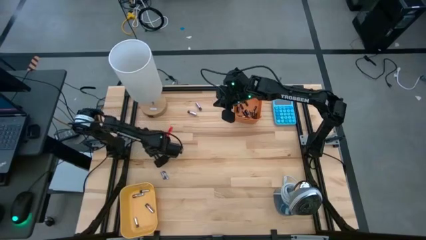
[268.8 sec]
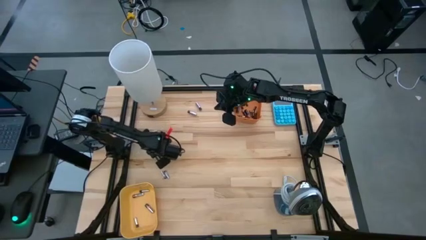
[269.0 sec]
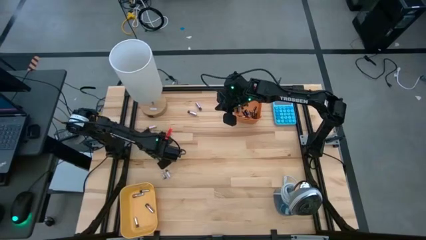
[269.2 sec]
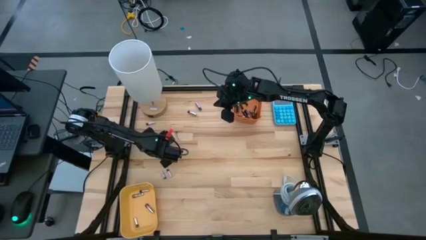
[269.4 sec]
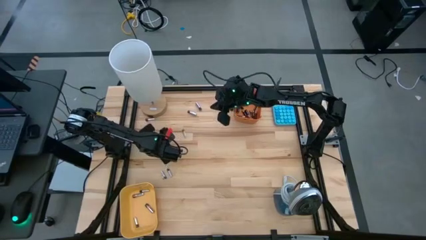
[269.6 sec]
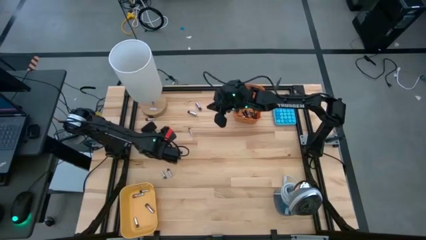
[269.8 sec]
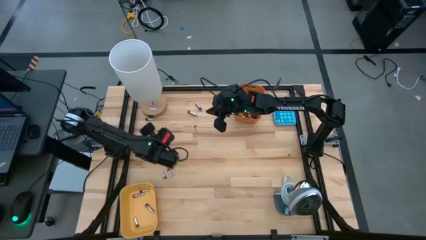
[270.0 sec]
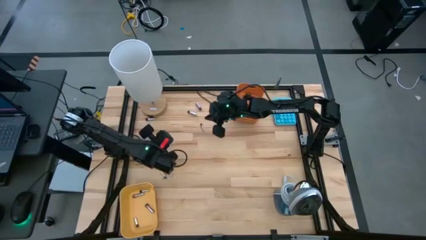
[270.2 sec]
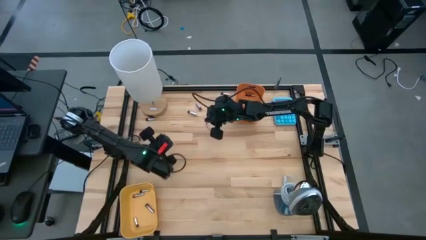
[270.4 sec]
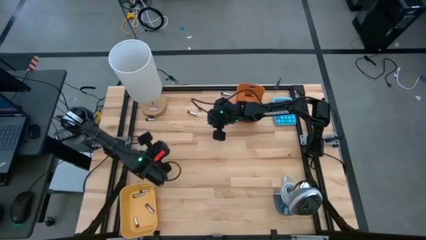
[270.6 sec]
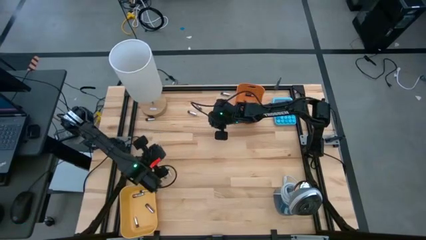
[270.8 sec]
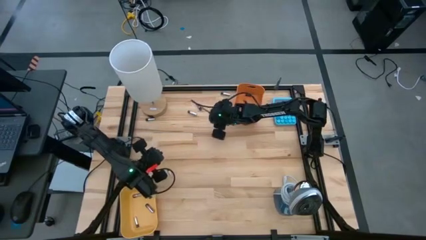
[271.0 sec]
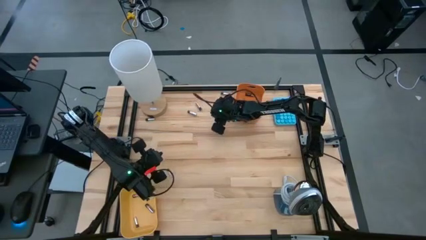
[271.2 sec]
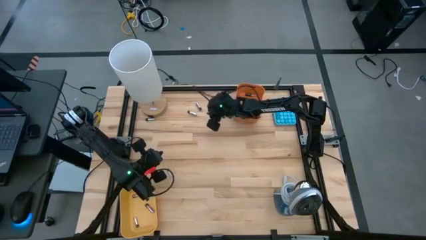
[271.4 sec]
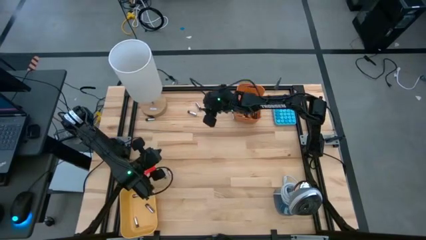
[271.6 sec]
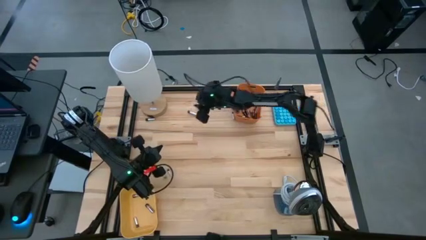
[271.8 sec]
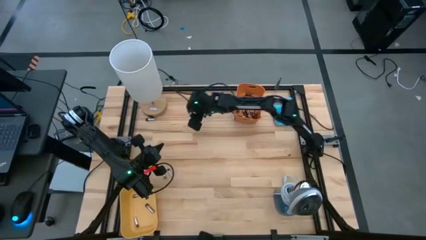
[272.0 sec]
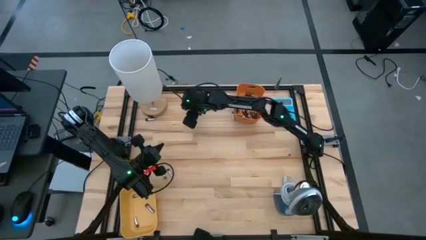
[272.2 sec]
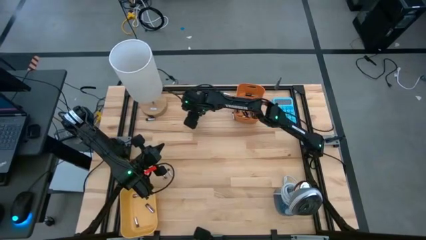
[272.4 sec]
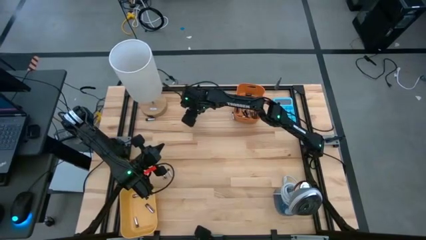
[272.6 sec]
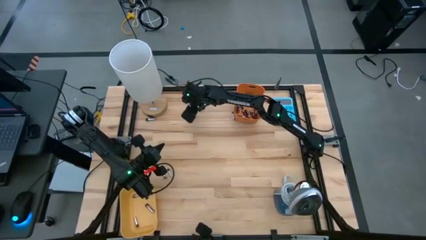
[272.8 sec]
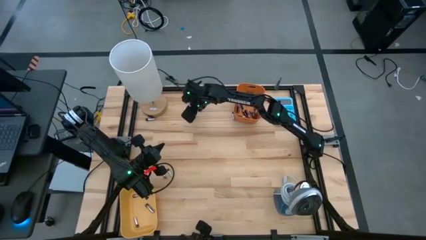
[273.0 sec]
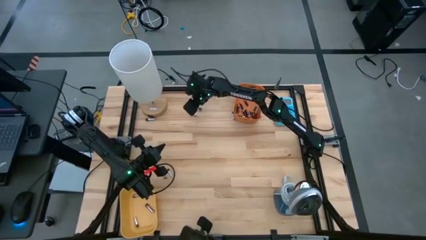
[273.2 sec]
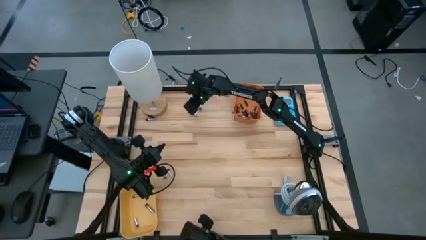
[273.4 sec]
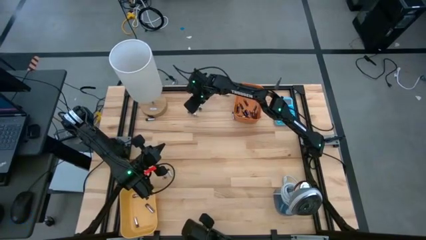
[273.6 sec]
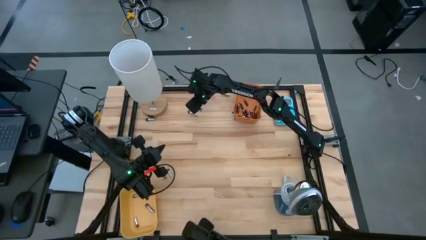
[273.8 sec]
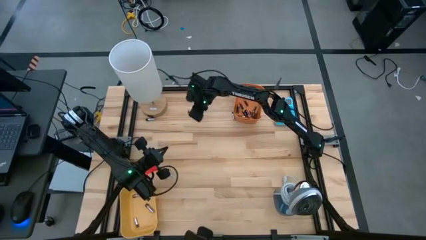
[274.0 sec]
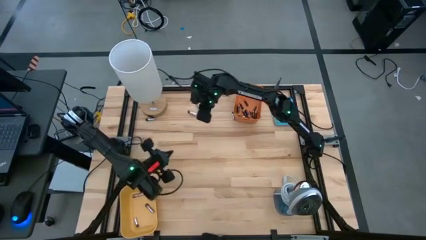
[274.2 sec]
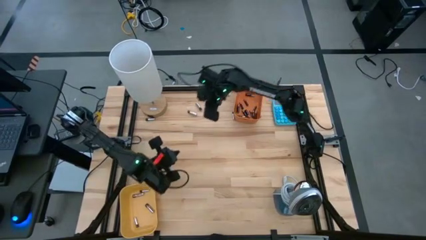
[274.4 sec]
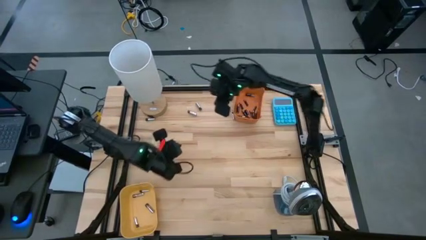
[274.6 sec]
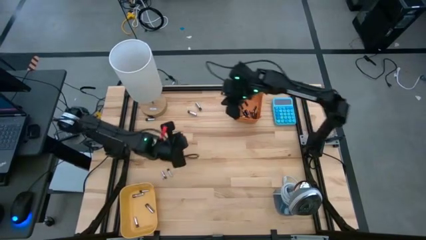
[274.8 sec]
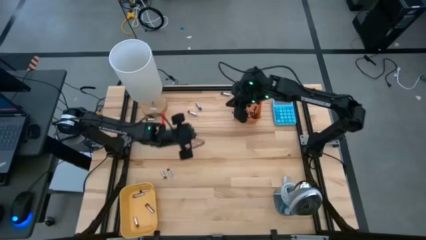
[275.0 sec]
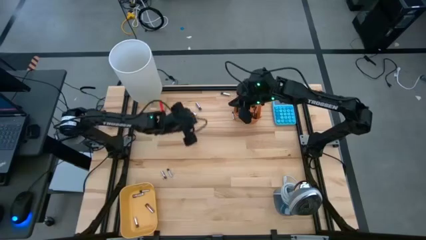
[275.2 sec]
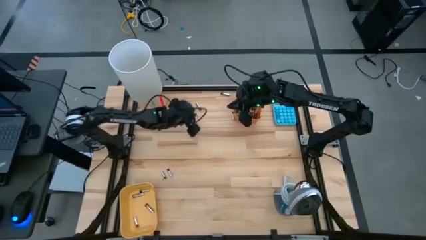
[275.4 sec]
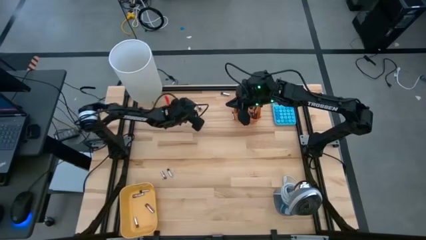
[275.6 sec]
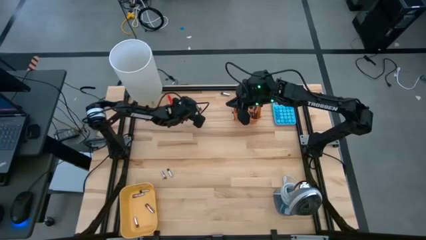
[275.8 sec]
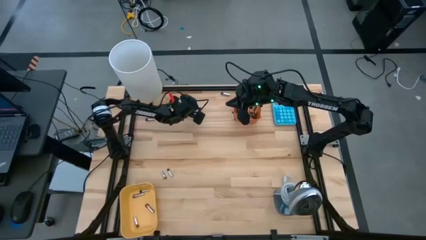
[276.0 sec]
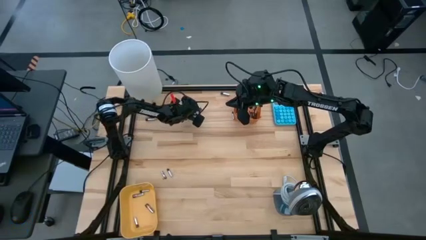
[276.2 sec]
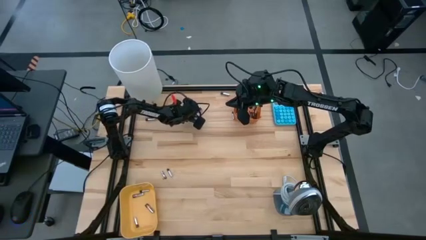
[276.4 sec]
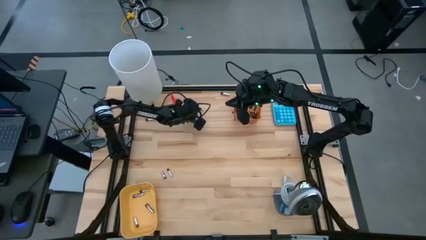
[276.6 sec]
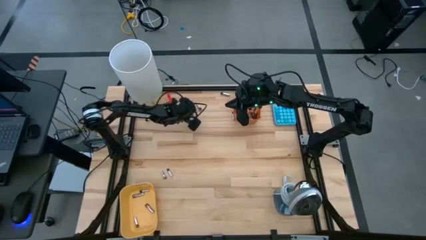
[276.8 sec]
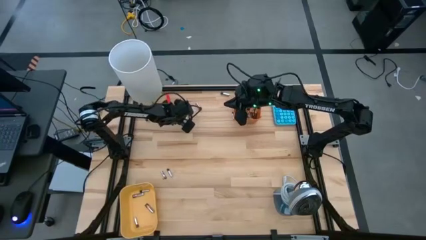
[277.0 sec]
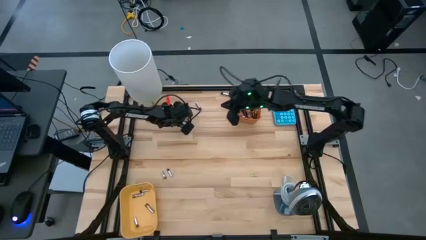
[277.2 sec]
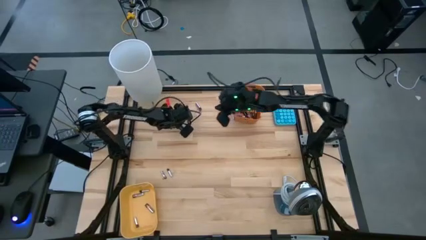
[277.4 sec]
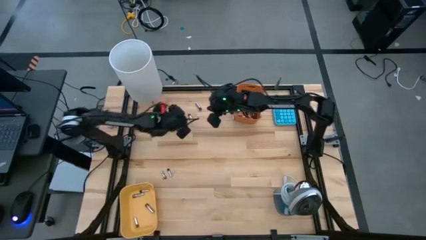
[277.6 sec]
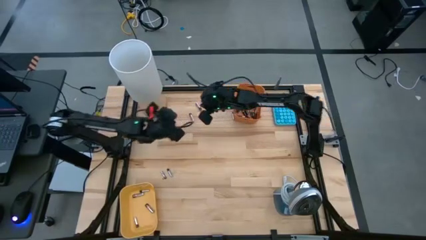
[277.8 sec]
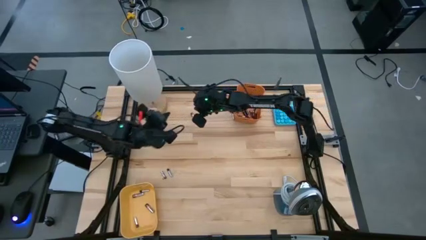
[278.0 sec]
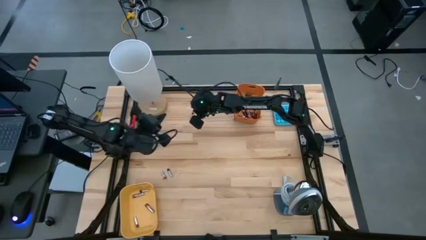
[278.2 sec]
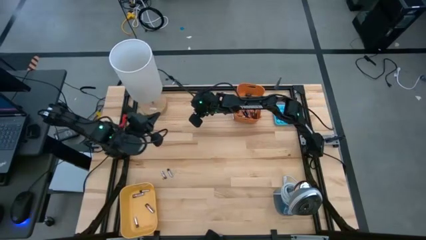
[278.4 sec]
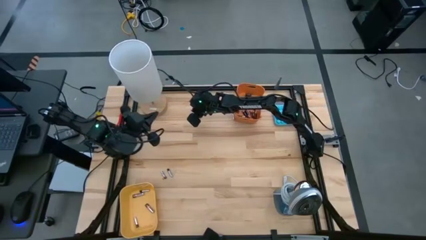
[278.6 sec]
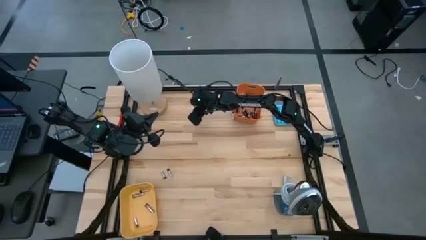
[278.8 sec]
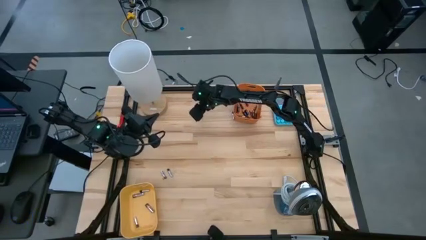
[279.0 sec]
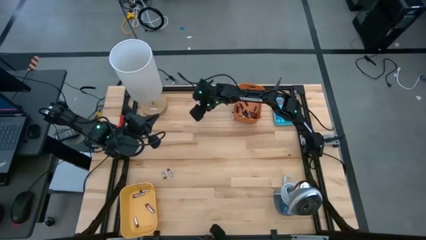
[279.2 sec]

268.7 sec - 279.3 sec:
Task: Sort batteries
Put the silver battery into the yellow bin

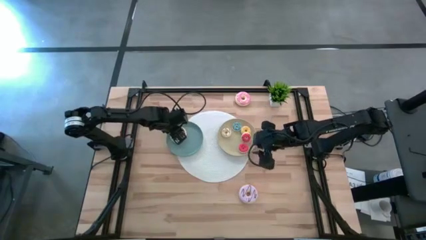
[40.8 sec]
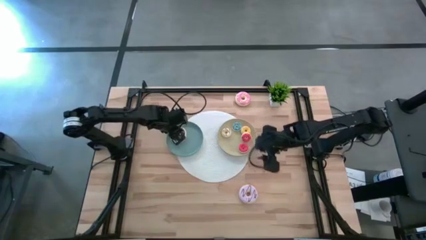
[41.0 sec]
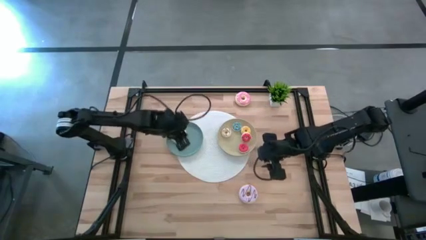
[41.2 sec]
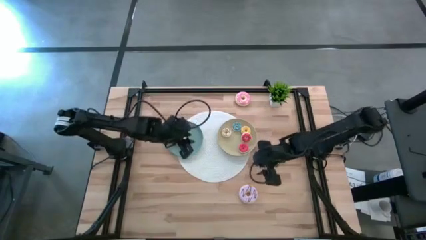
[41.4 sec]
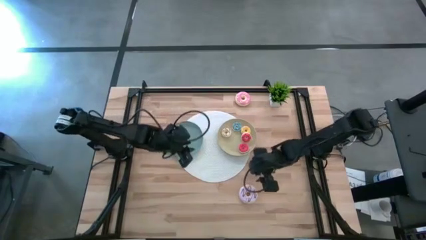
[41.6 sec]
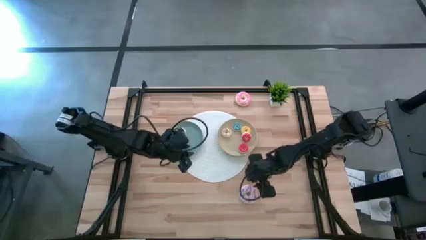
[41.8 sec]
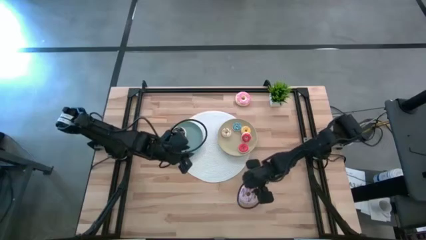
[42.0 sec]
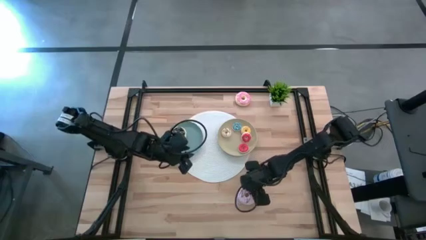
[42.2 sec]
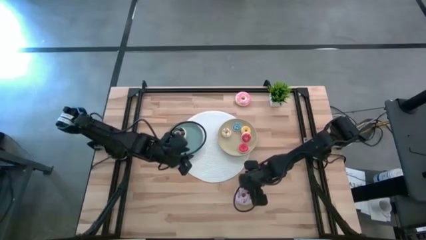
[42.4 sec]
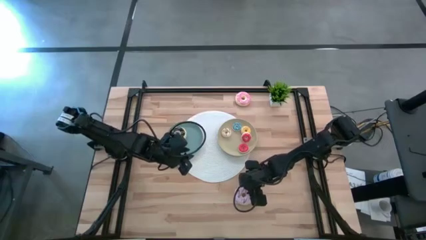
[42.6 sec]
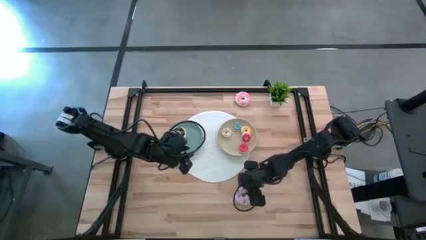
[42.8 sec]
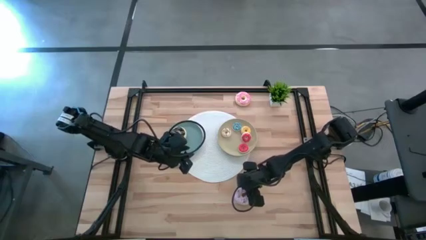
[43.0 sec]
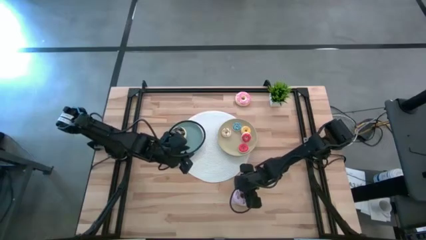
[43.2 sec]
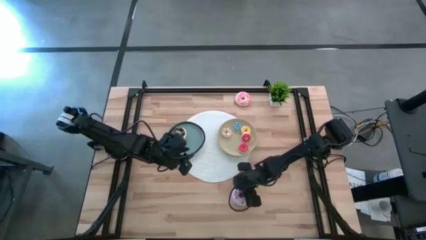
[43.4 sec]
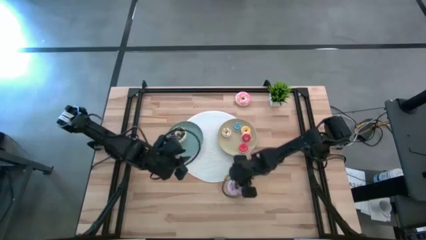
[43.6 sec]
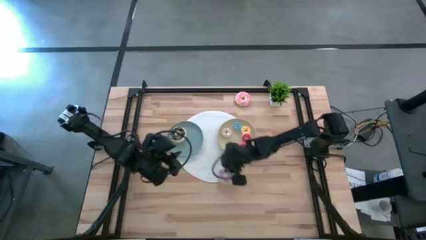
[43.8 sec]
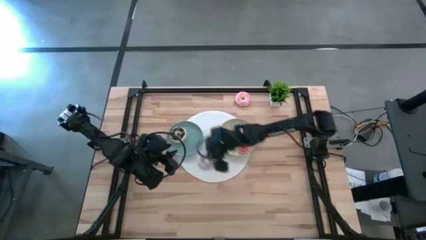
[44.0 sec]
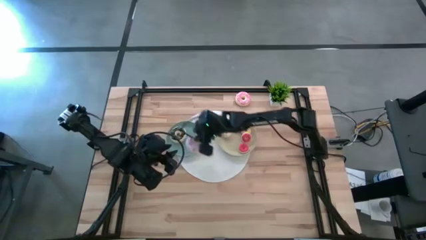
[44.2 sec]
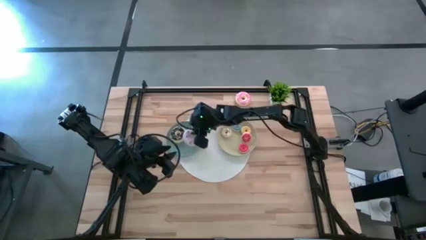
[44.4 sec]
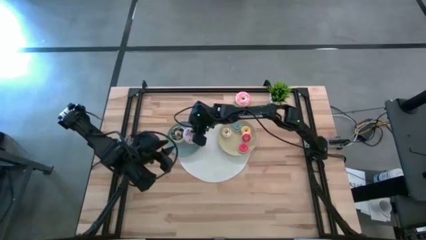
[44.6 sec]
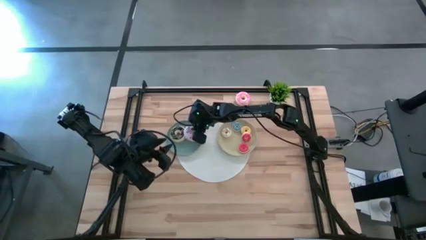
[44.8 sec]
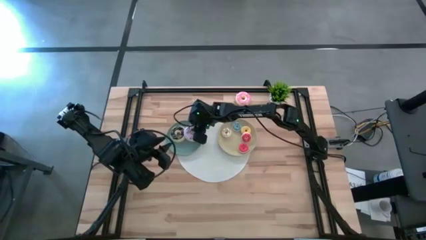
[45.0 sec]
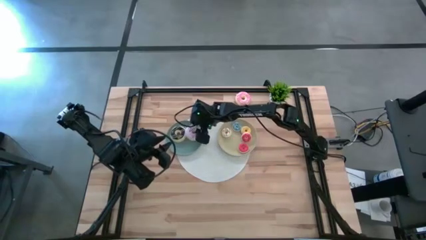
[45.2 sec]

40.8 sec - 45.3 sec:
Task: Pick & Place donuts
Put the big purple donut on the blue plate
